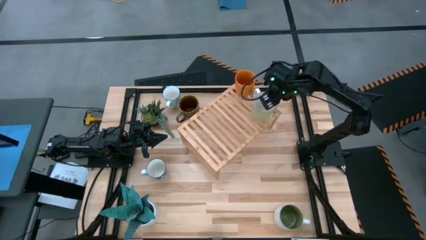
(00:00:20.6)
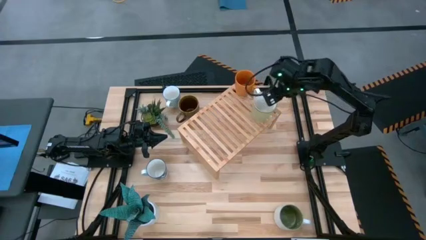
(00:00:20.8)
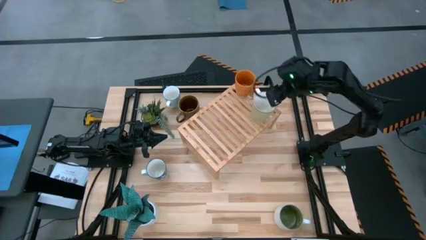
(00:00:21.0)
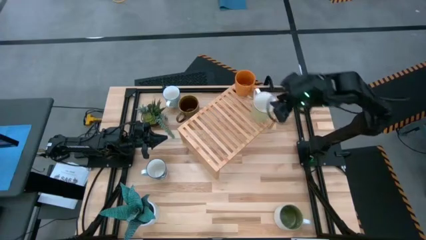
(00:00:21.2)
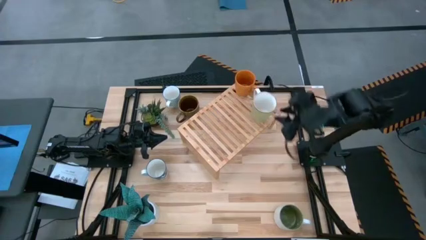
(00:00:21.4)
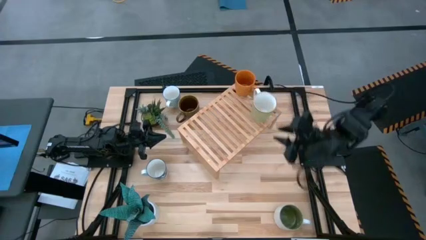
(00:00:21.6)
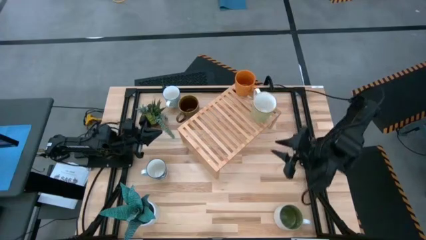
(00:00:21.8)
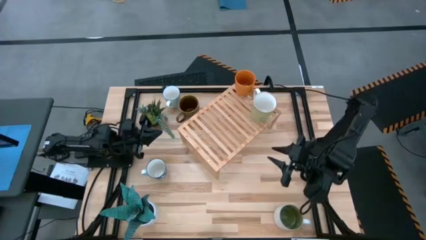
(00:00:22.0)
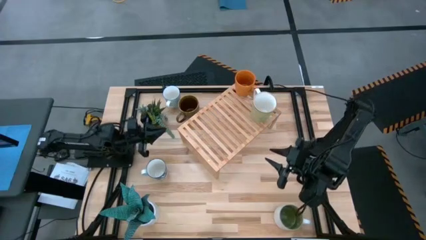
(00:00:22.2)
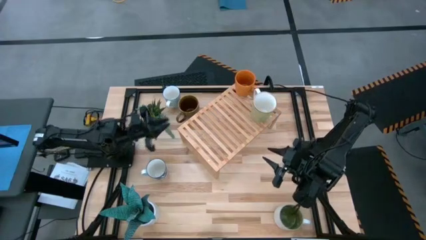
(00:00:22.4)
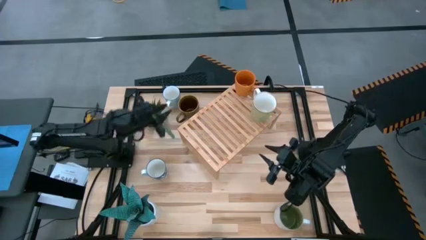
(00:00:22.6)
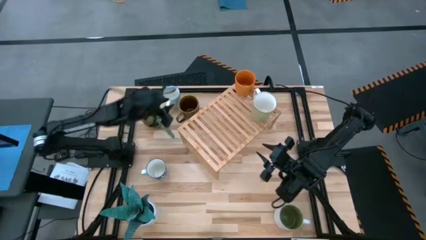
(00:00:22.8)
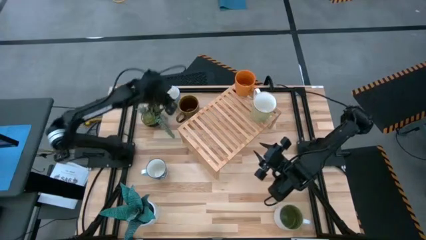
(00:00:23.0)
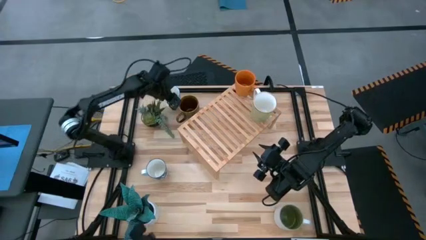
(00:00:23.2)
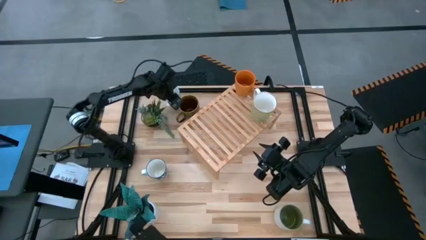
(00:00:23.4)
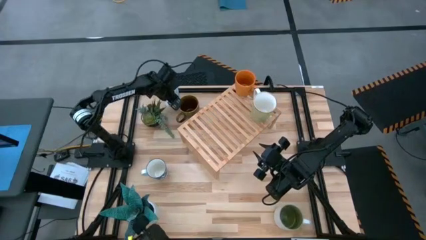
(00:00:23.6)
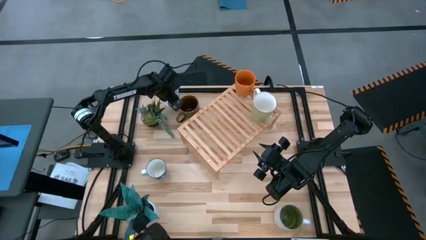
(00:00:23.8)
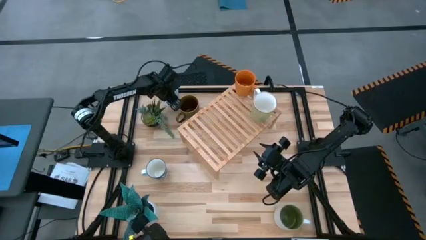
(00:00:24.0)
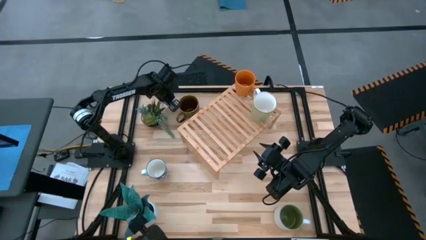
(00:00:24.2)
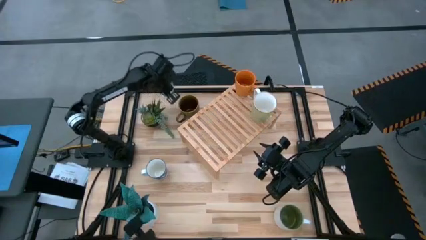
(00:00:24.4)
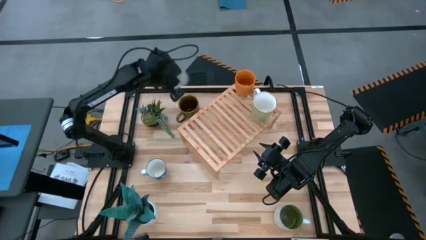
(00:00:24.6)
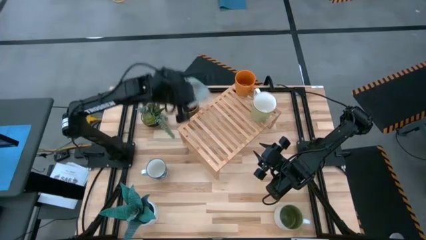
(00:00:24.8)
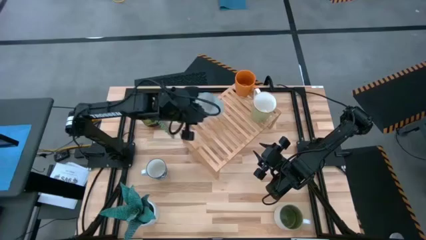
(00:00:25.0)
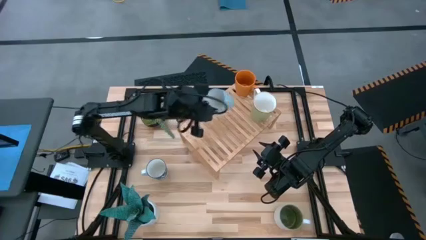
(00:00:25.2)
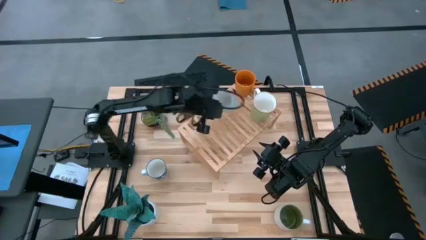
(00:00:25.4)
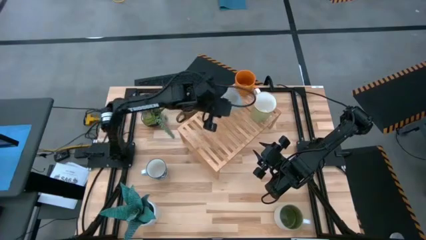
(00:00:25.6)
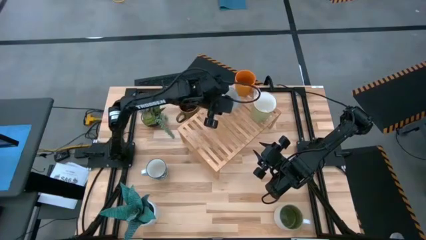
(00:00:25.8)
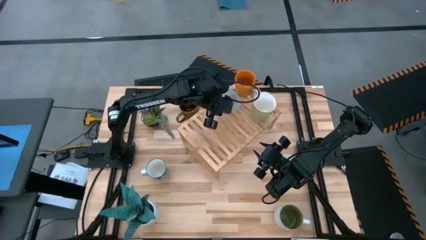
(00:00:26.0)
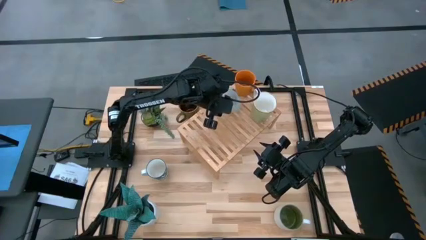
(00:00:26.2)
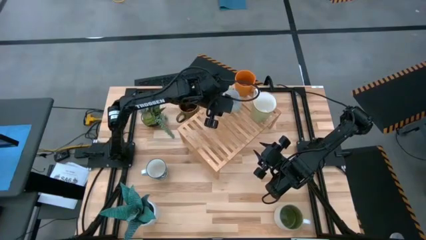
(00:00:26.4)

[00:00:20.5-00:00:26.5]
Task: Place coffee mugs
Put the light blue patterned mug on the shelf

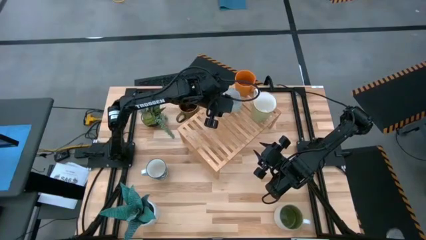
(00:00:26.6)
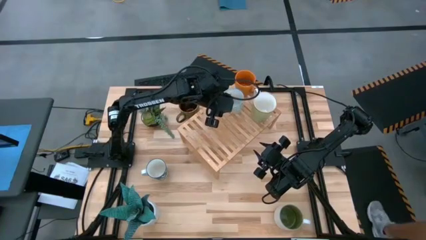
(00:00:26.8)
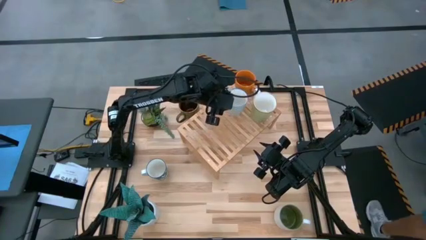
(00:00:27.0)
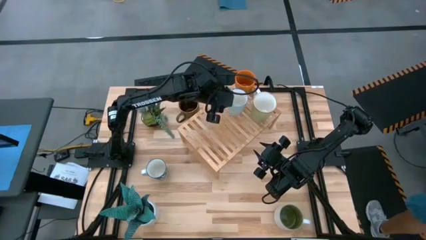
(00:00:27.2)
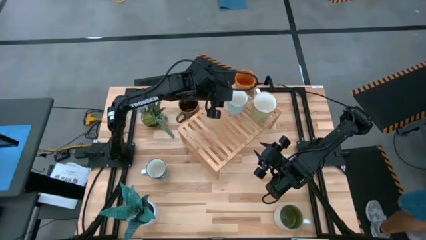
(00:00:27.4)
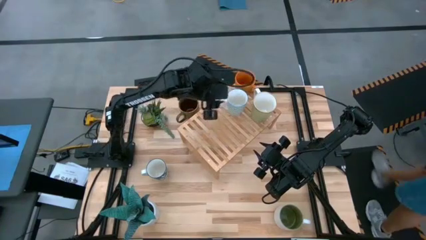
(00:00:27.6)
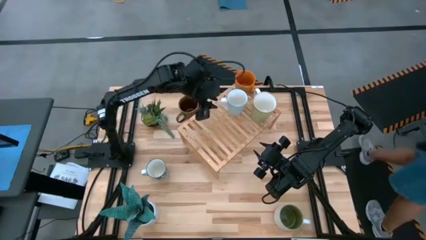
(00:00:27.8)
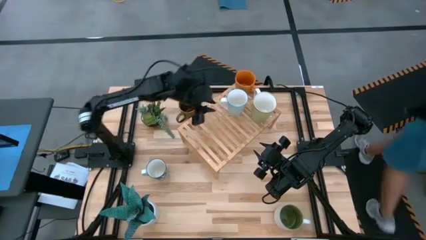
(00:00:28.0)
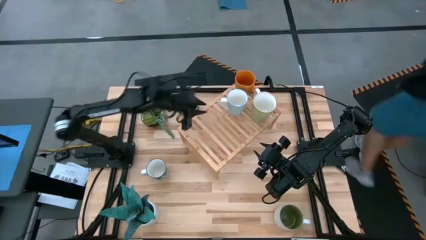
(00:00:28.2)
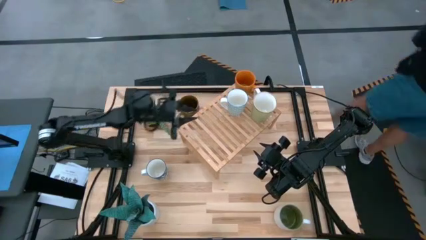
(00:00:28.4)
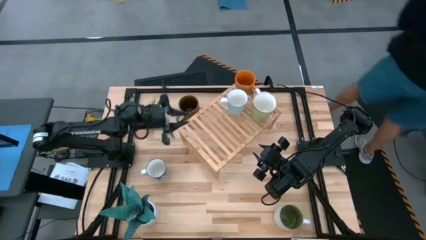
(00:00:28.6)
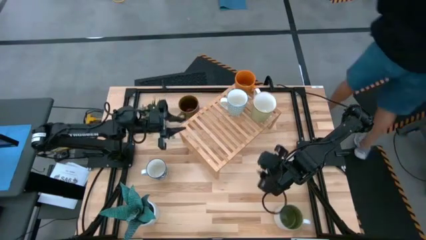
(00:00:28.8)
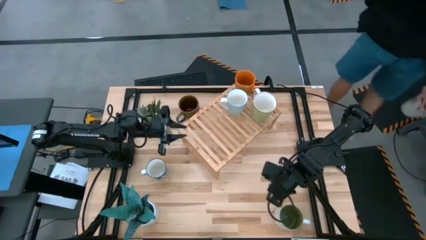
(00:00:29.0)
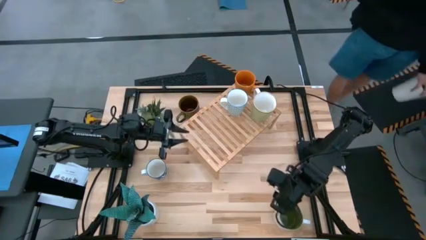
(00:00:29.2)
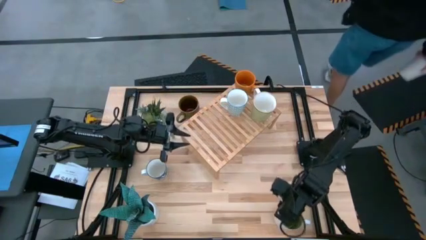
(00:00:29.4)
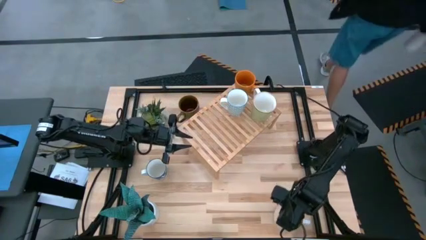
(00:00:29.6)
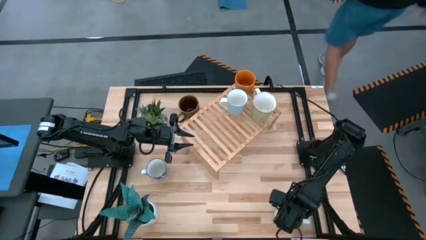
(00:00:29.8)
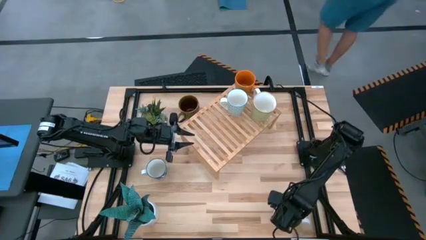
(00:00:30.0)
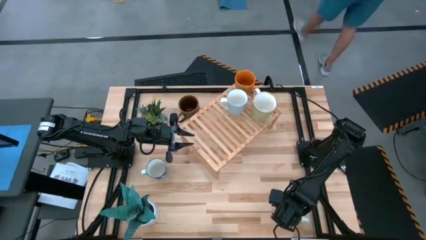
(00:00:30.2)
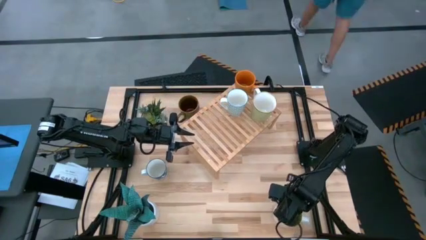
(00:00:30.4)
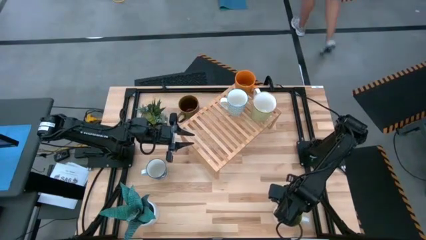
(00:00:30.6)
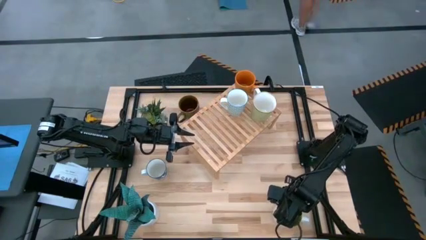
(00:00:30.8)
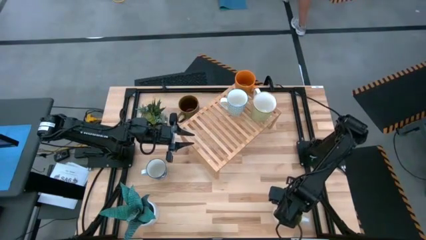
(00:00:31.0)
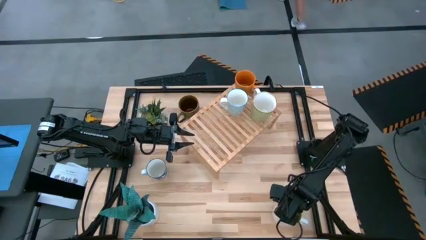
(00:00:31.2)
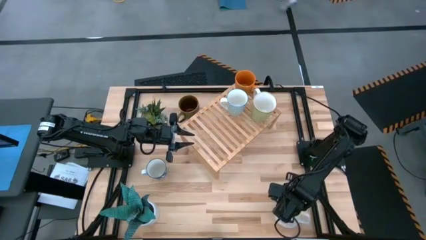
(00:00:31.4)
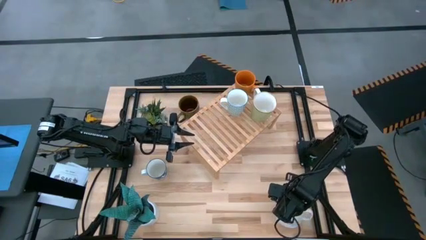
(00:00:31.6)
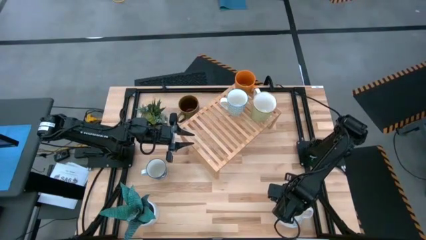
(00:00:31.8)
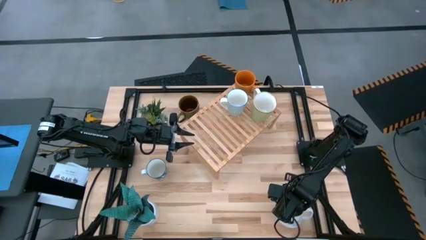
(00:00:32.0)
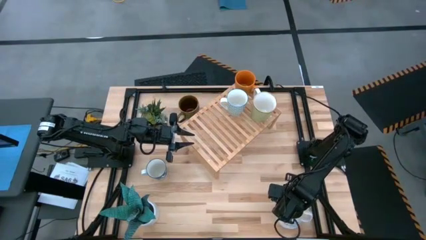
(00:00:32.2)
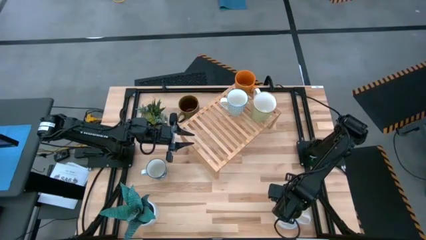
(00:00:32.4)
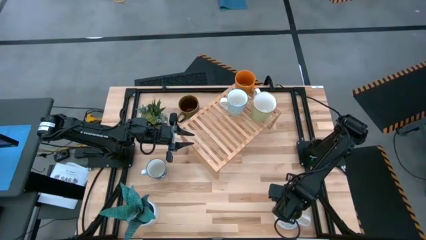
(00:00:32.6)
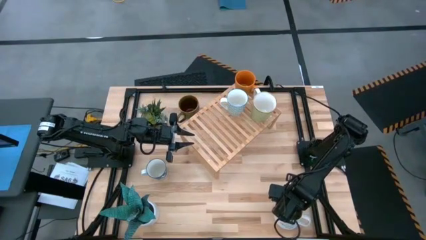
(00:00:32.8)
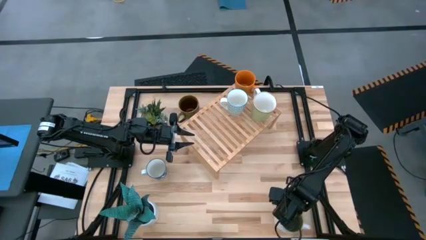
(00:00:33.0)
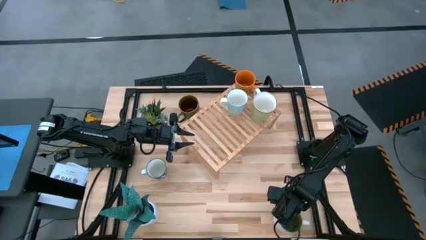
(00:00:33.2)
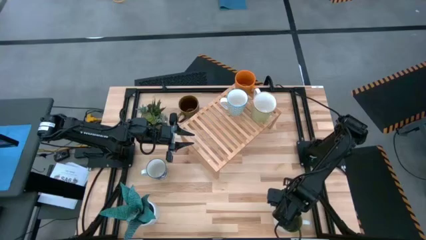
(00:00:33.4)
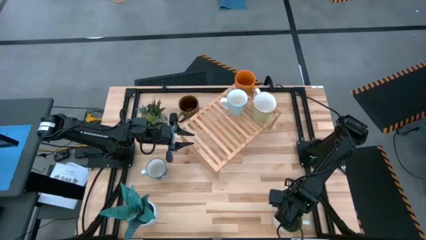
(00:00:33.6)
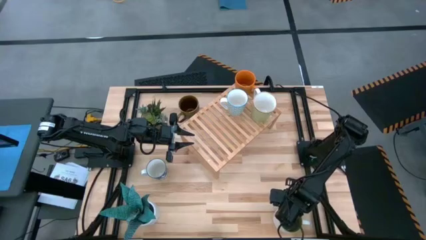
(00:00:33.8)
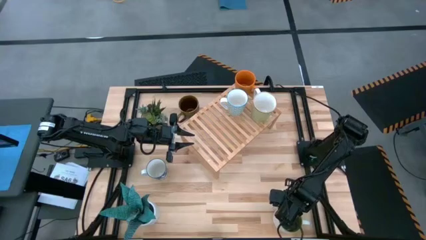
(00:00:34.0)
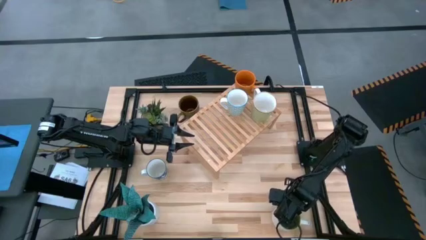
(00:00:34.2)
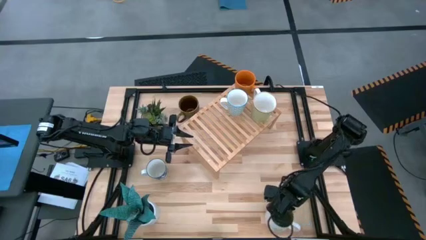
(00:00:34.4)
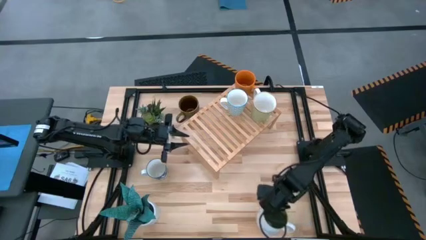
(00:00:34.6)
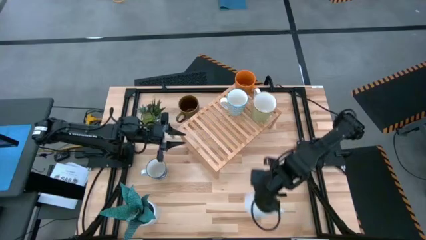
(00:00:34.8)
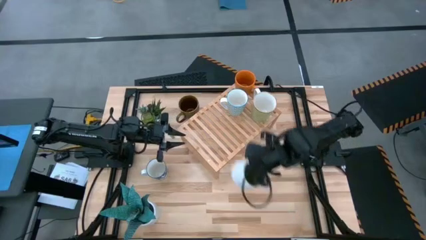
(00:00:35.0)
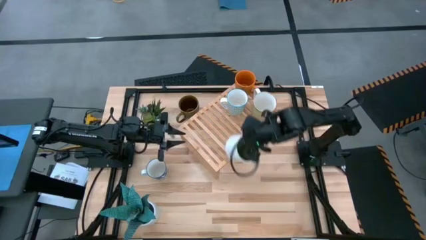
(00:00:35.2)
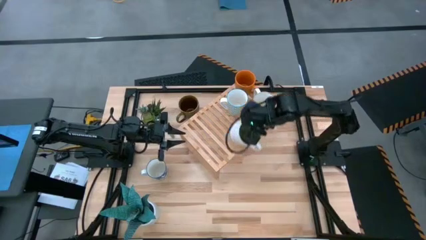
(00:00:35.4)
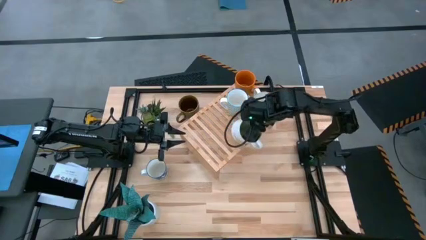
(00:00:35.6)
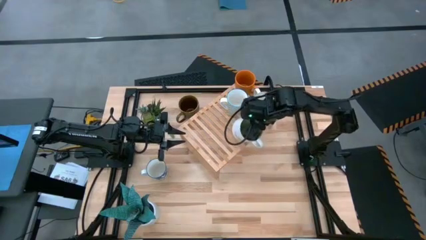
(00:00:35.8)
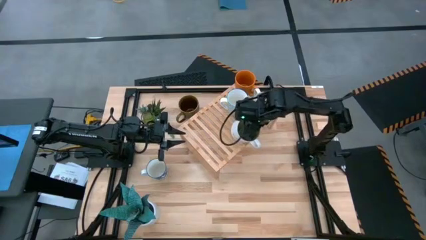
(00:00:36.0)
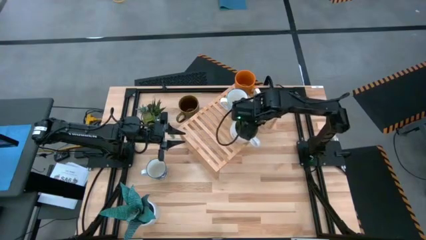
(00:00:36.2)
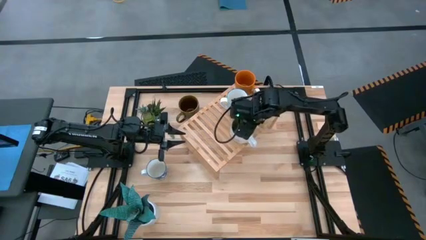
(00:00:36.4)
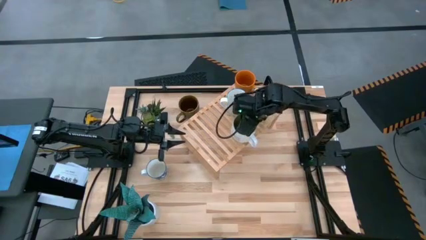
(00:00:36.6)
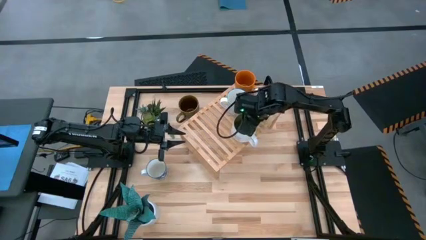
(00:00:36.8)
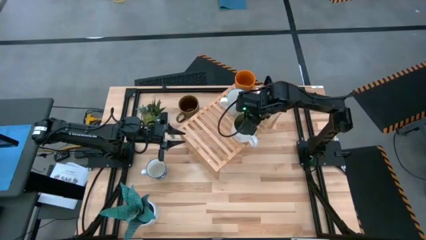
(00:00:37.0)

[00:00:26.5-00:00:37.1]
Put the white mug on the shelf
